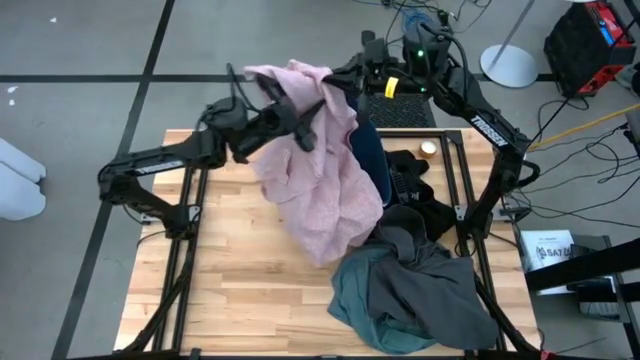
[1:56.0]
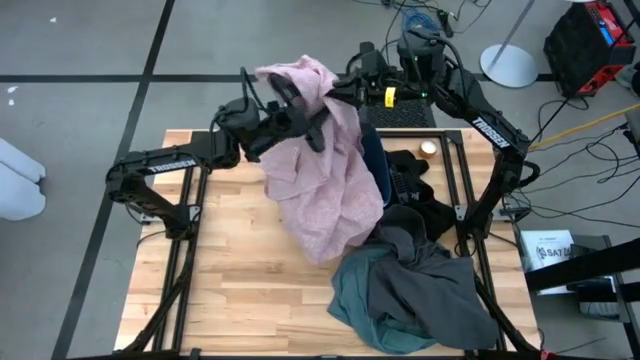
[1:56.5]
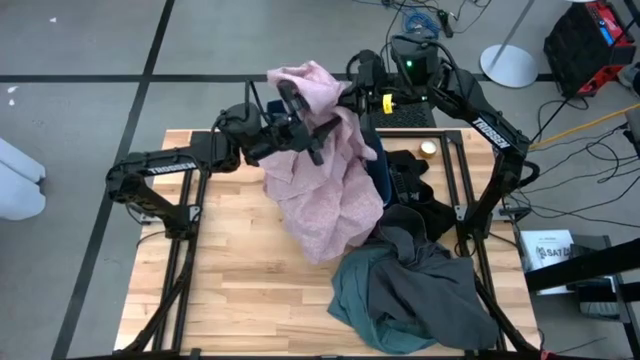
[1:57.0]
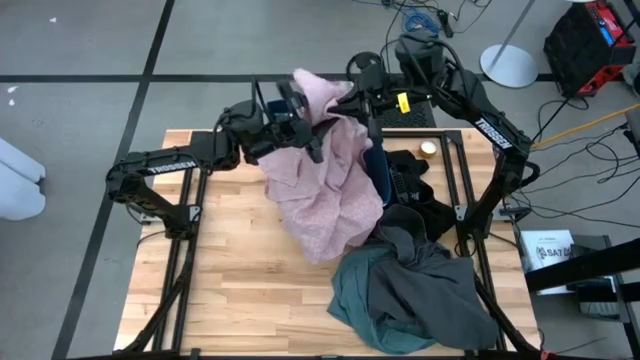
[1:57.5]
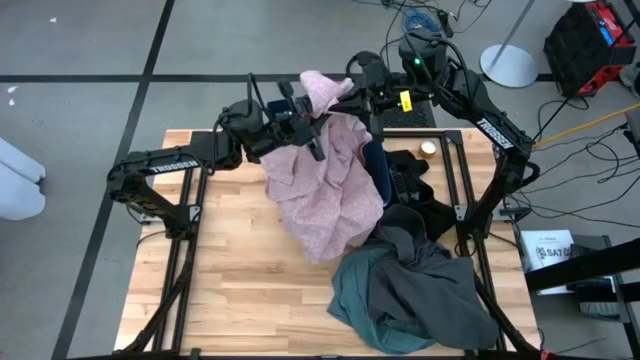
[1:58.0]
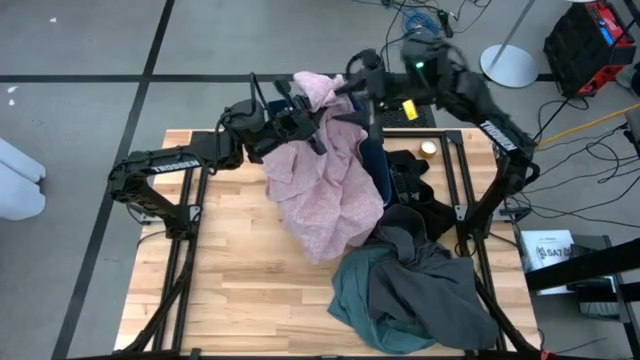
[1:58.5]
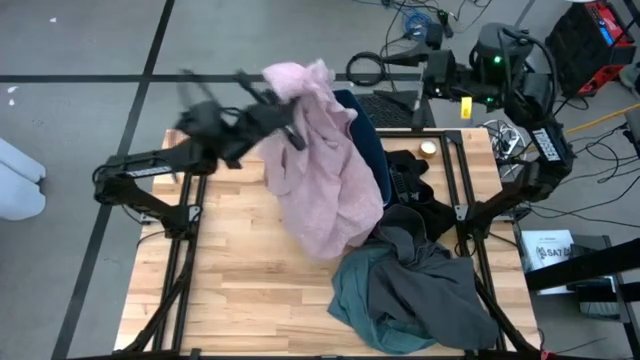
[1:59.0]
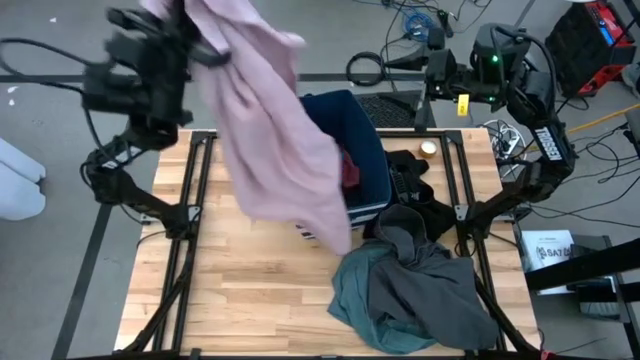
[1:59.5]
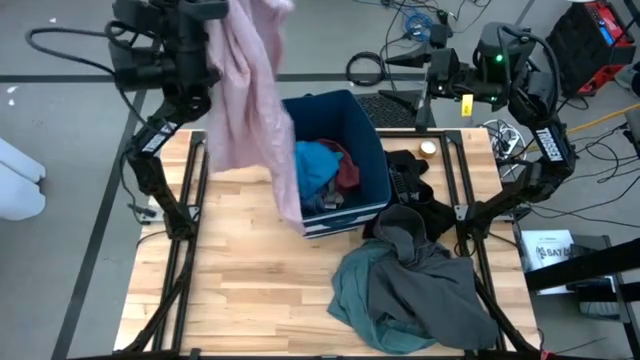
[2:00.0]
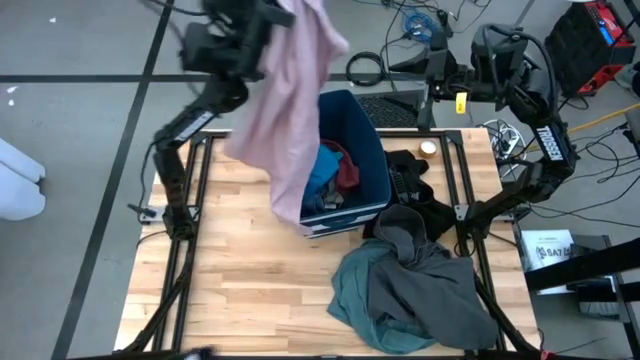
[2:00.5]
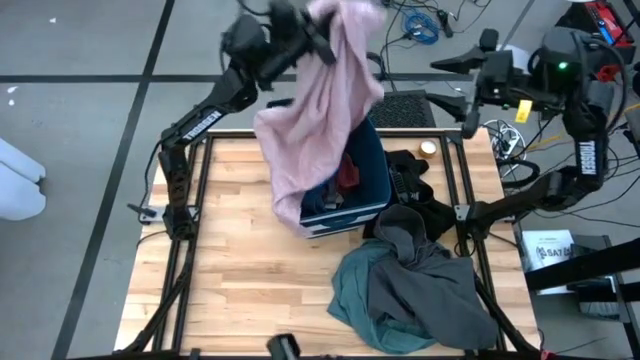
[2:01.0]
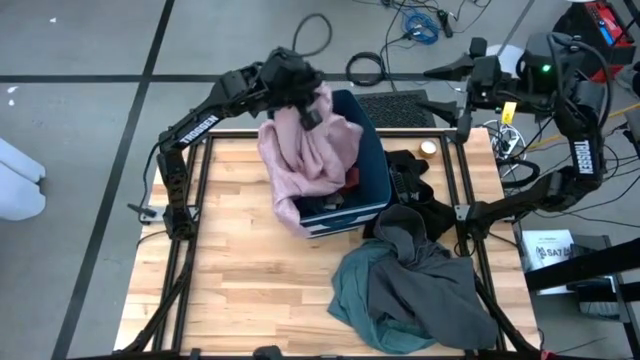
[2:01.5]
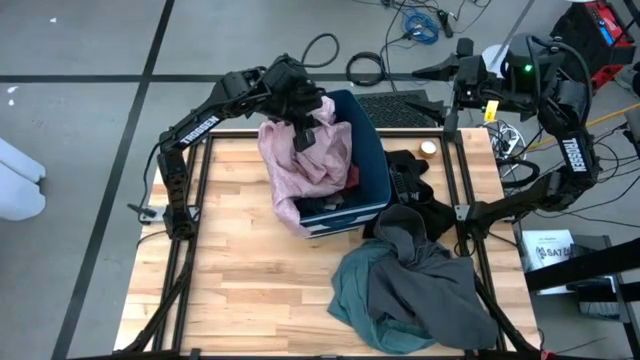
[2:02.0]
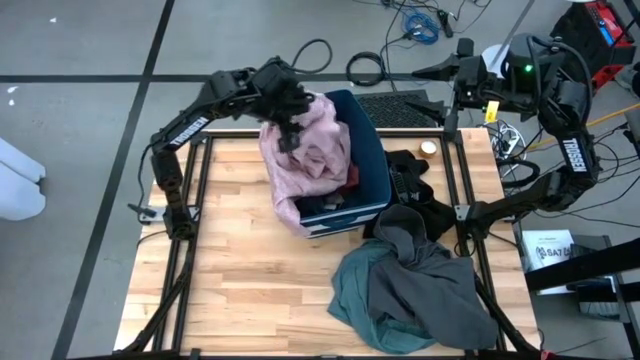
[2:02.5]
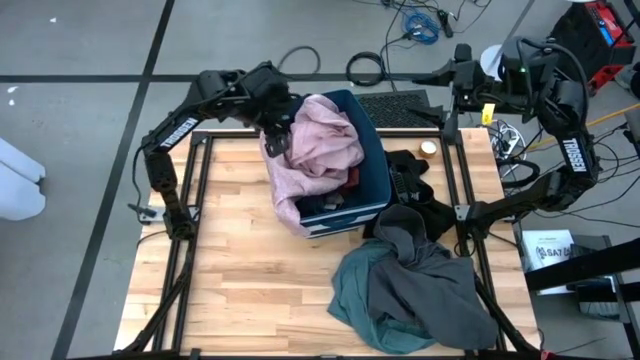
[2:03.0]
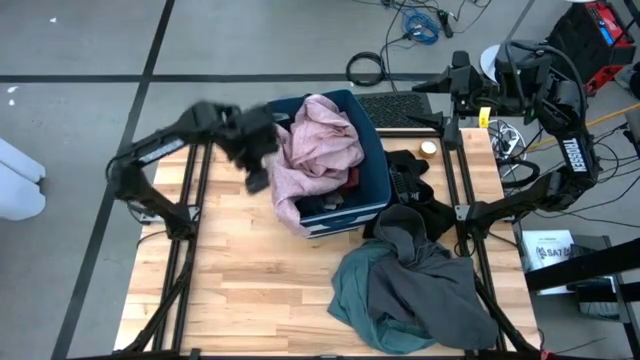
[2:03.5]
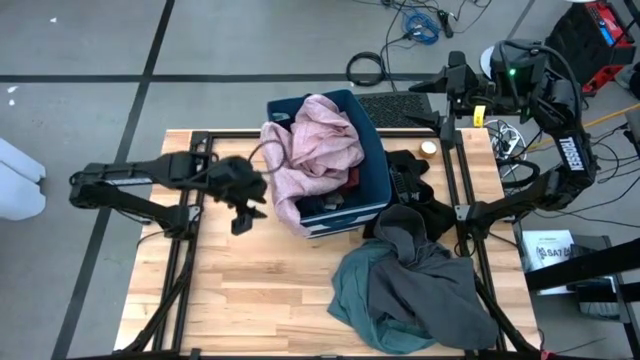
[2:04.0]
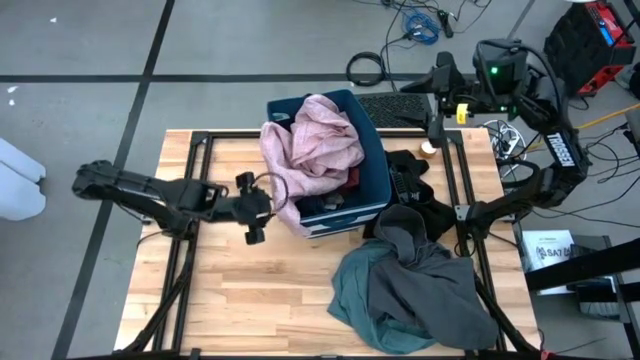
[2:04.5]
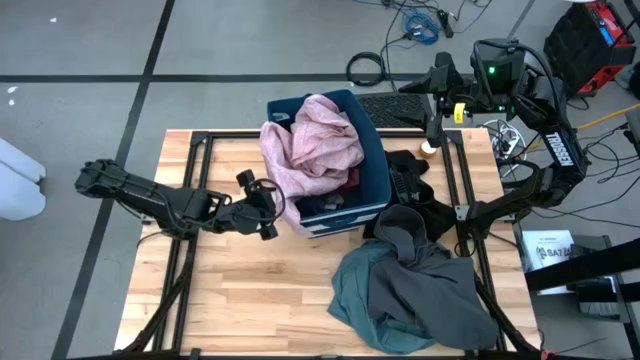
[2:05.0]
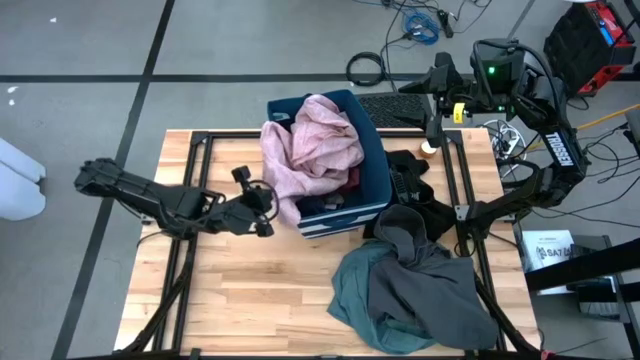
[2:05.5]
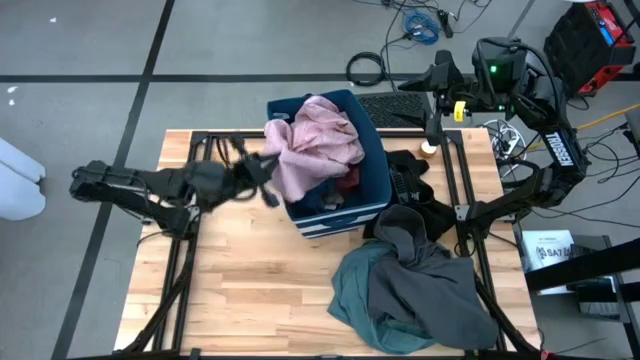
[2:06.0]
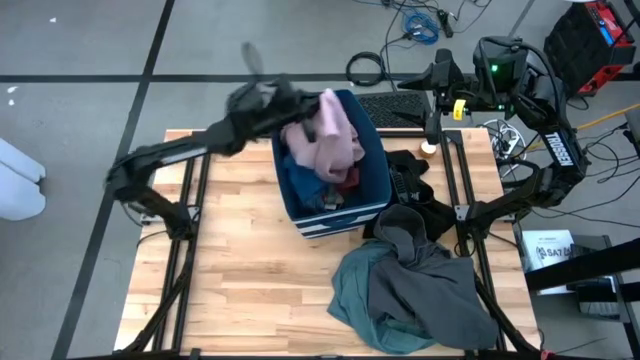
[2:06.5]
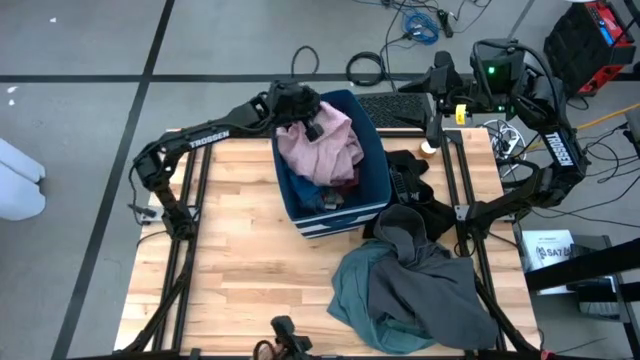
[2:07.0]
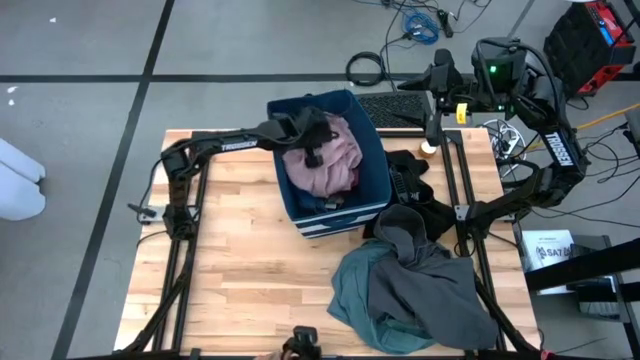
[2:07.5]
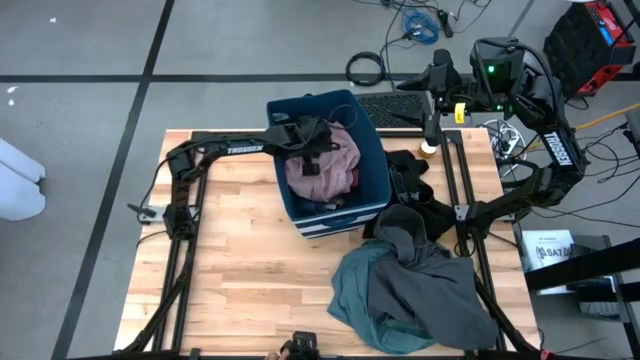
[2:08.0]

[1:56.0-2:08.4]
Task: Sort clothes
Put the pink polo shirt into the blue laundry organizer

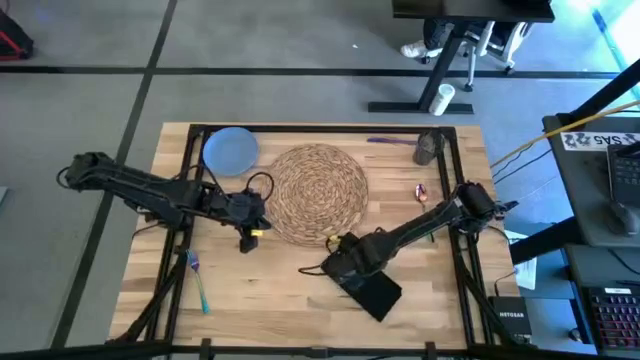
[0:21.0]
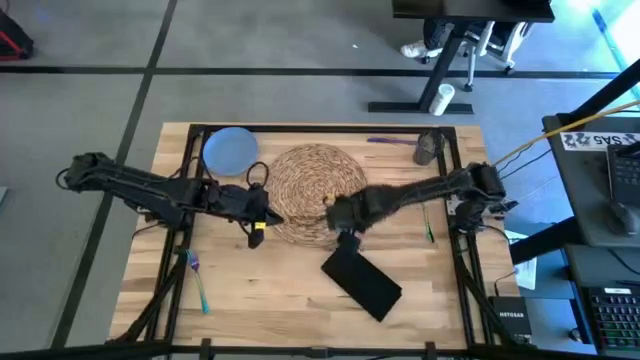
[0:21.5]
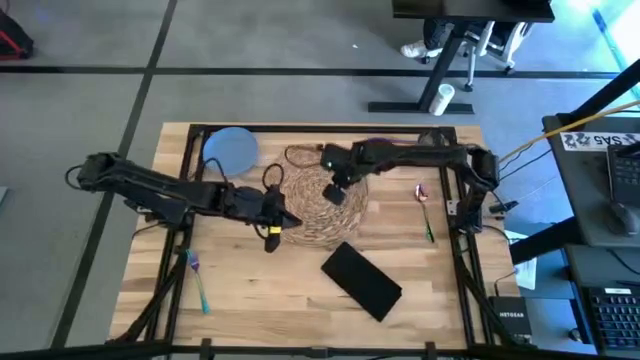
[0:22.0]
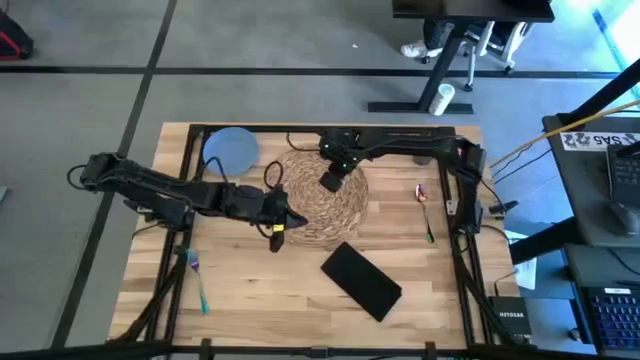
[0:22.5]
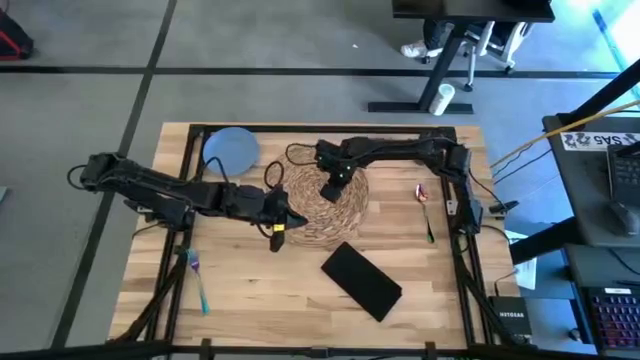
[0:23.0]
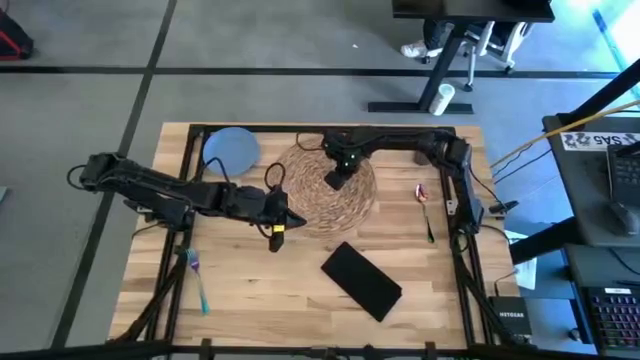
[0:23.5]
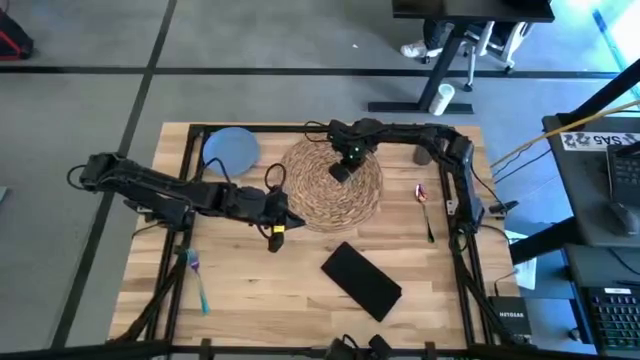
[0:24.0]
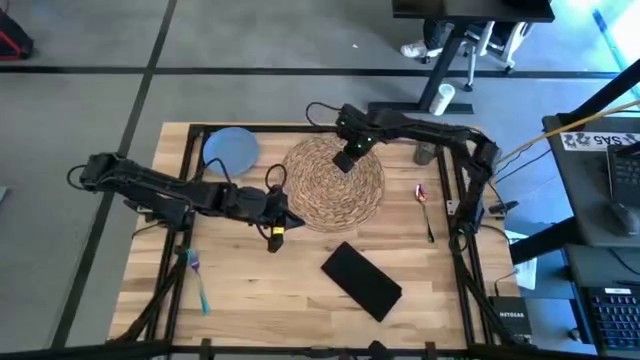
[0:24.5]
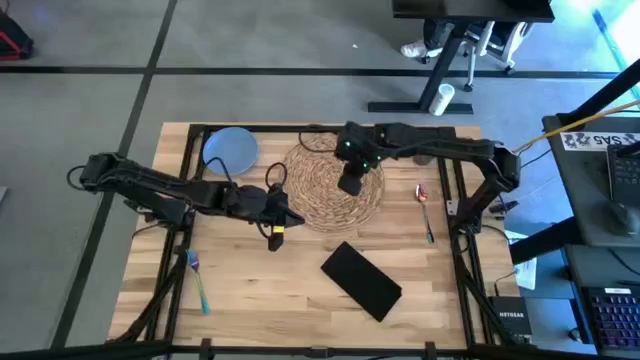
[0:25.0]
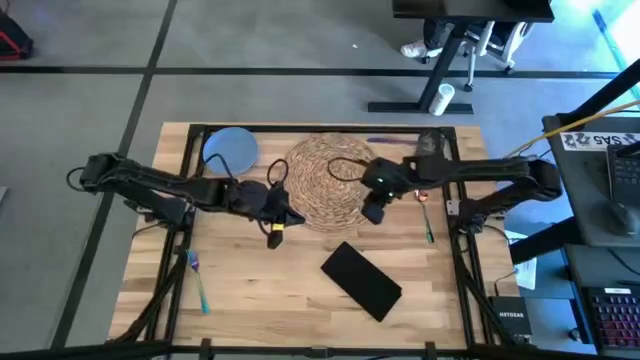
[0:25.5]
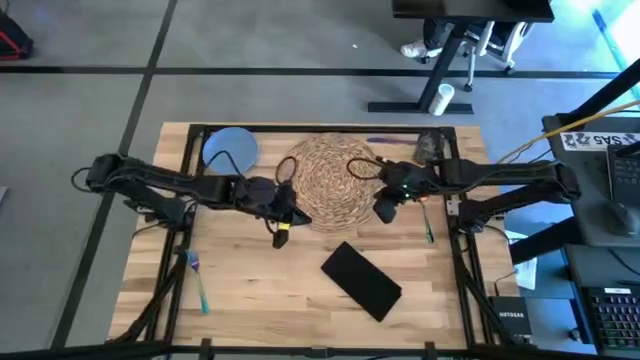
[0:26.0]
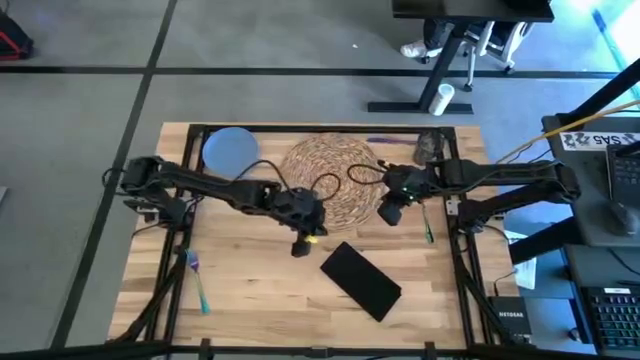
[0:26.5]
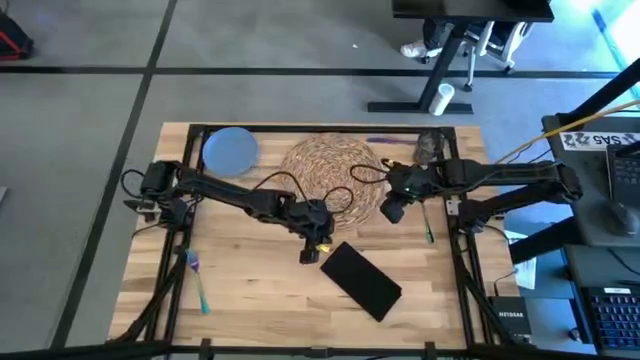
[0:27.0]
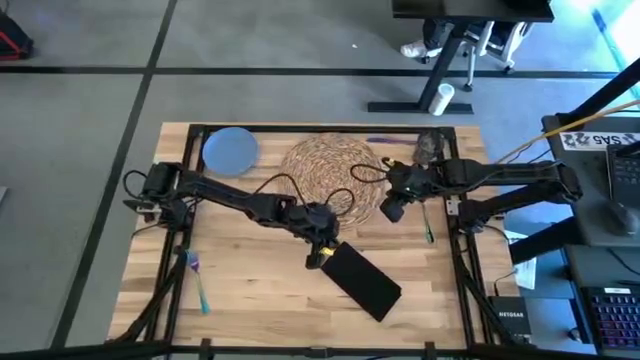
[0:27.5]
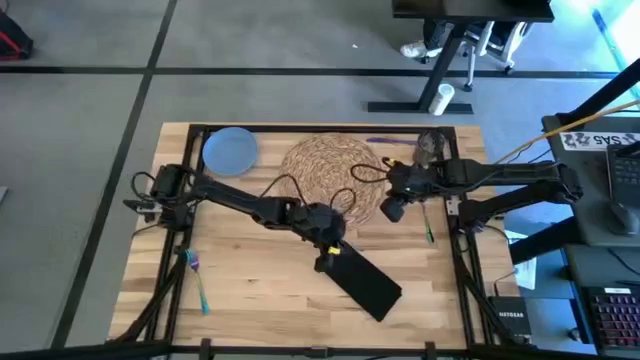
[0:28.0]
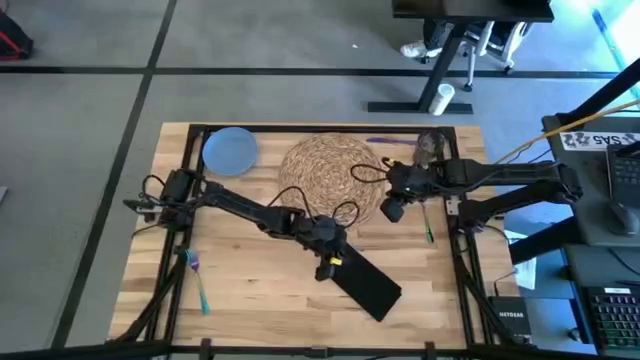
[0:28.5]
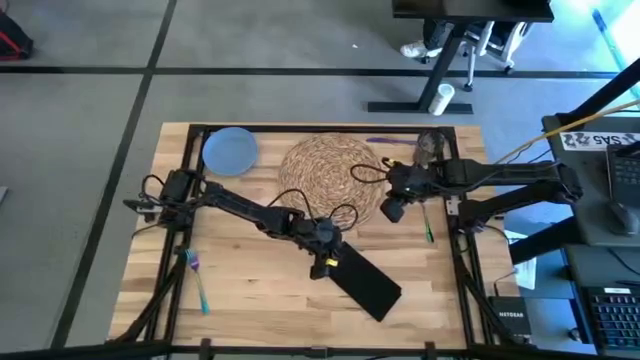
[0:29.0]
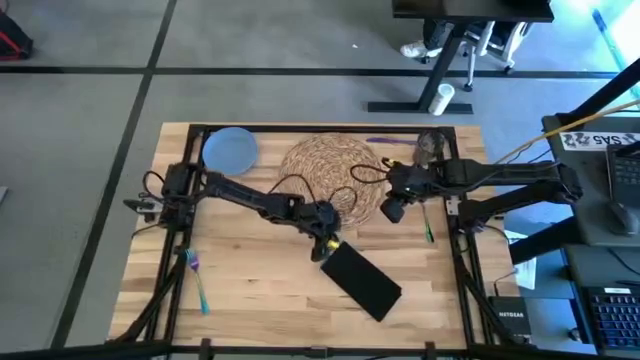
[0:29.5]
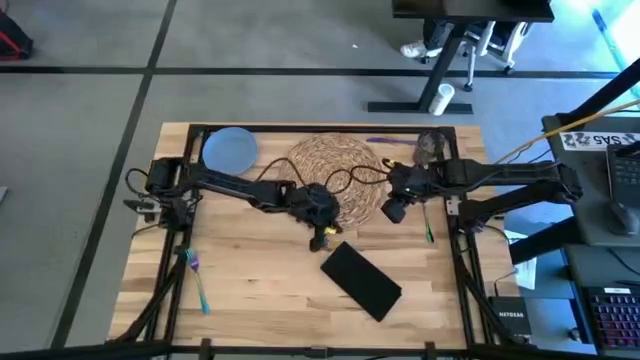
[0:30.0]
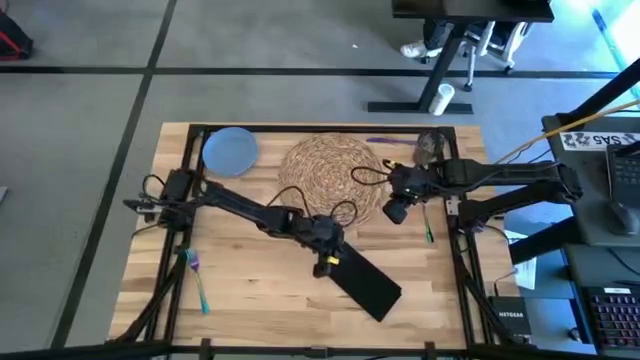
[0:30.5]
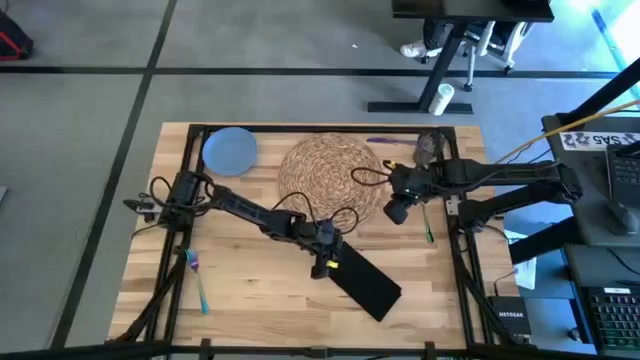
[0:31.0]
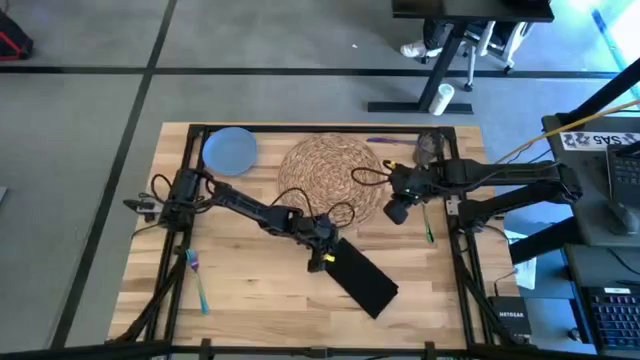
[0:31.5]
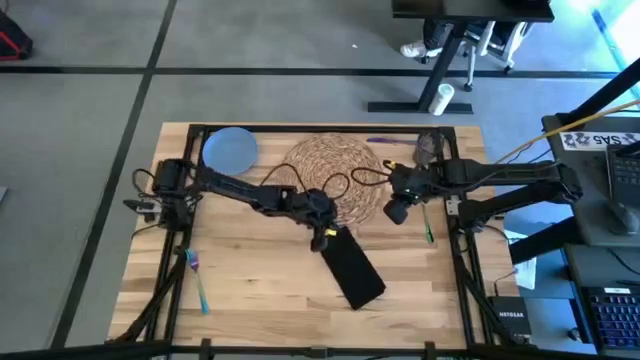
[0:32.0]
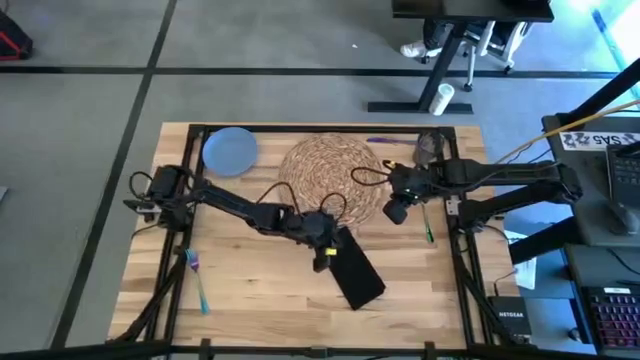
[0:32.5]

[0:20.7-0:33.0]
Task: Set table place
Put the black table napkin to the left side of the brown placemat
